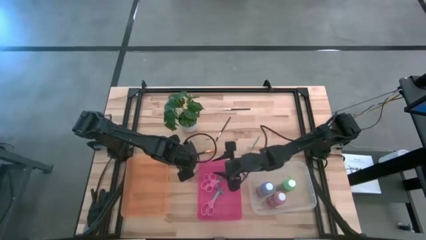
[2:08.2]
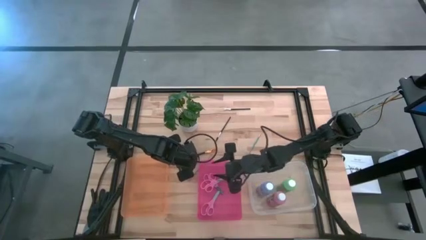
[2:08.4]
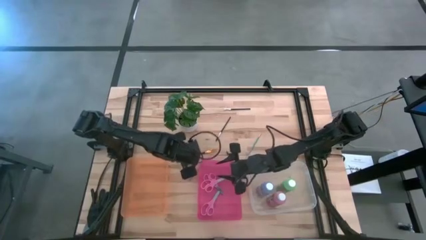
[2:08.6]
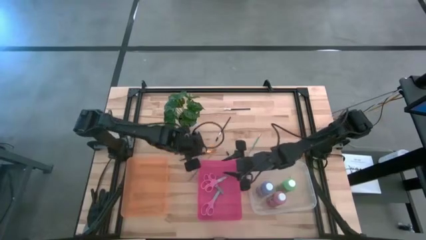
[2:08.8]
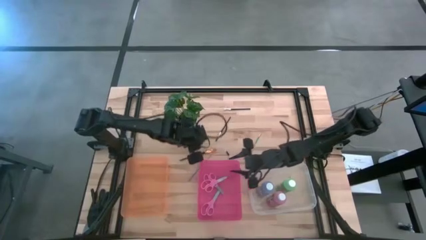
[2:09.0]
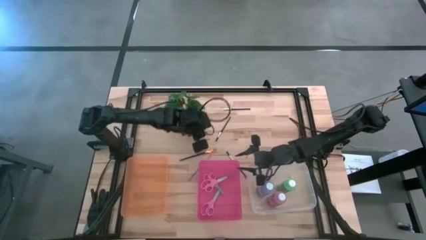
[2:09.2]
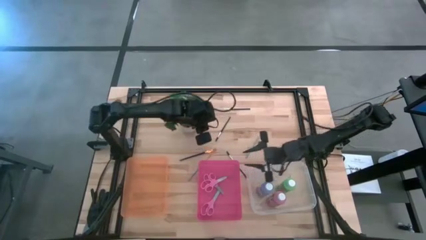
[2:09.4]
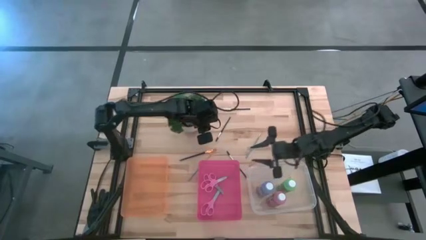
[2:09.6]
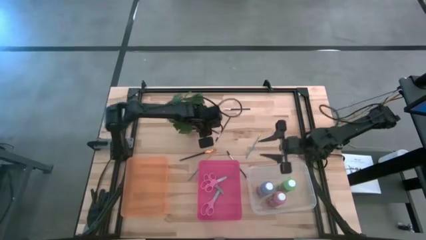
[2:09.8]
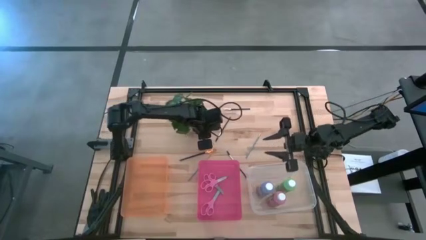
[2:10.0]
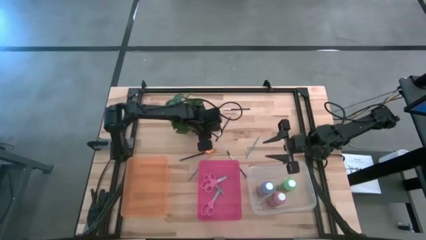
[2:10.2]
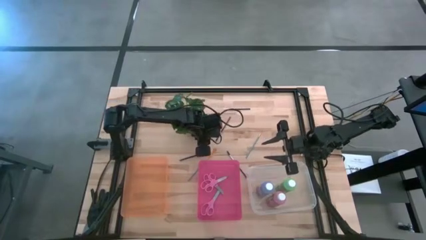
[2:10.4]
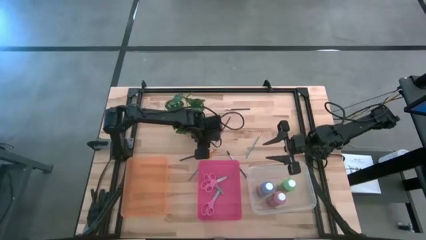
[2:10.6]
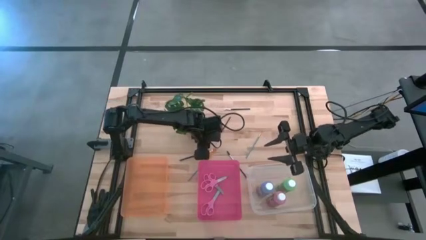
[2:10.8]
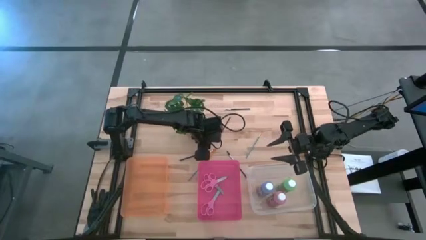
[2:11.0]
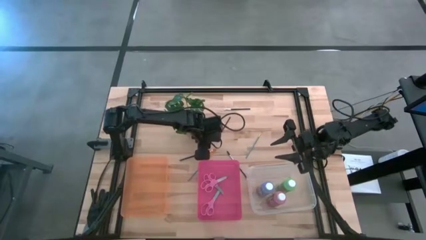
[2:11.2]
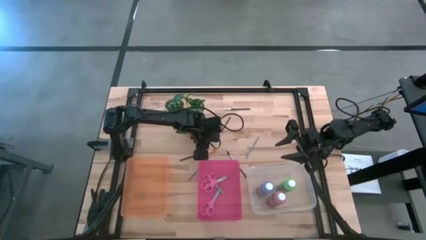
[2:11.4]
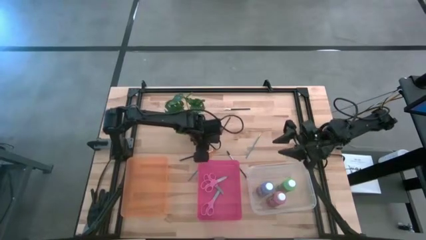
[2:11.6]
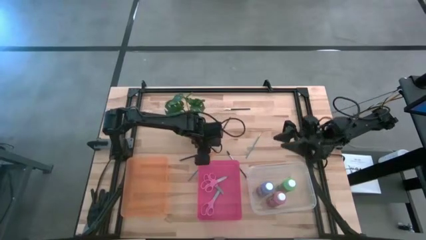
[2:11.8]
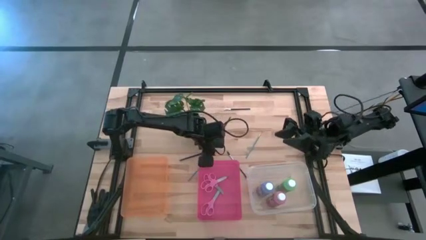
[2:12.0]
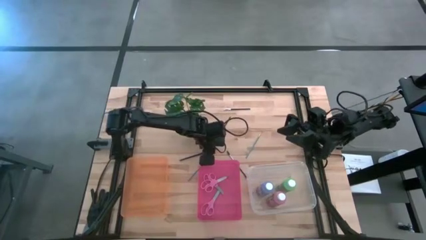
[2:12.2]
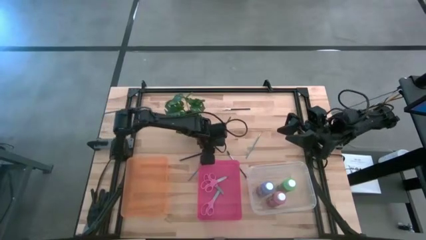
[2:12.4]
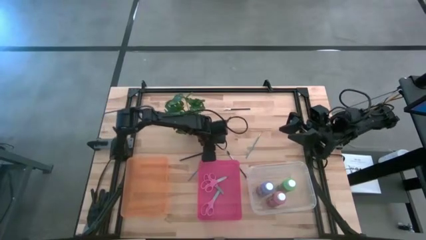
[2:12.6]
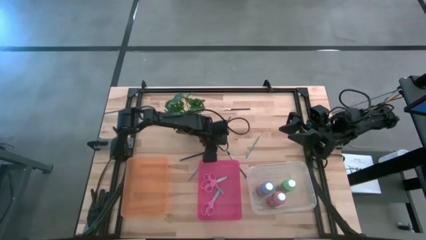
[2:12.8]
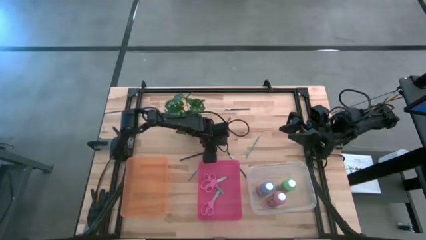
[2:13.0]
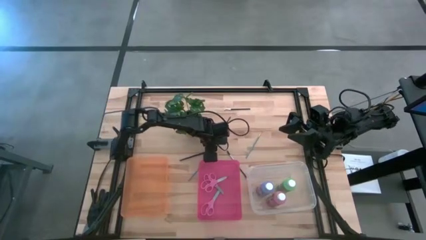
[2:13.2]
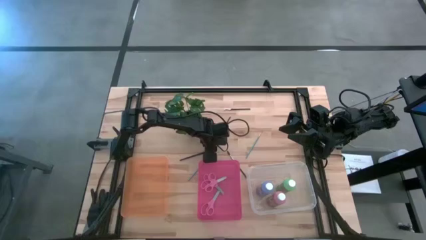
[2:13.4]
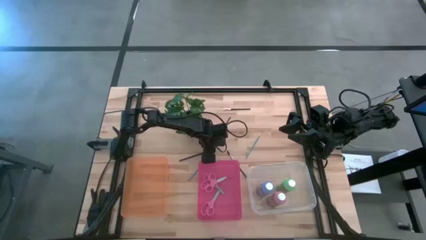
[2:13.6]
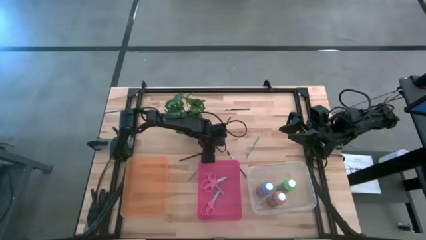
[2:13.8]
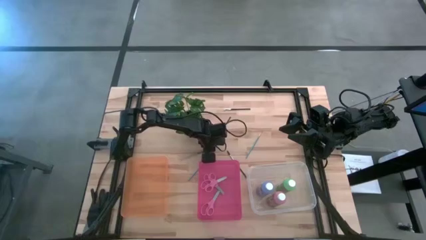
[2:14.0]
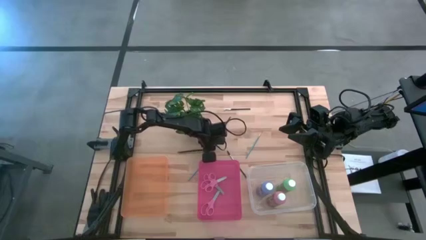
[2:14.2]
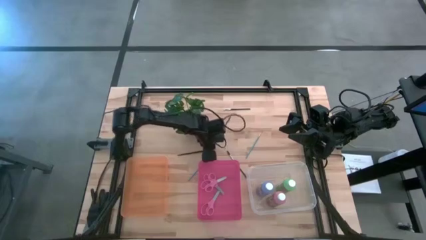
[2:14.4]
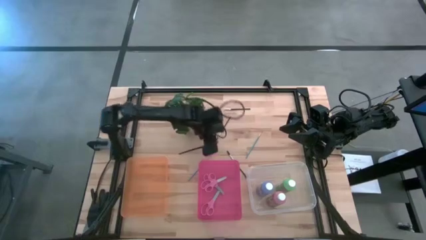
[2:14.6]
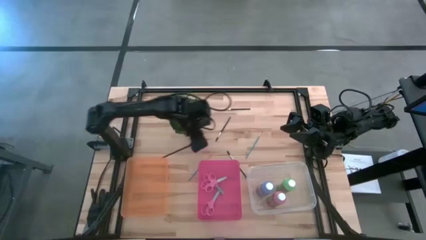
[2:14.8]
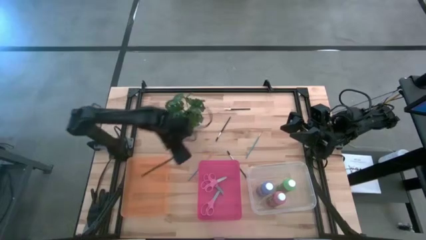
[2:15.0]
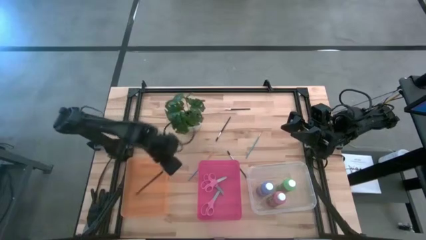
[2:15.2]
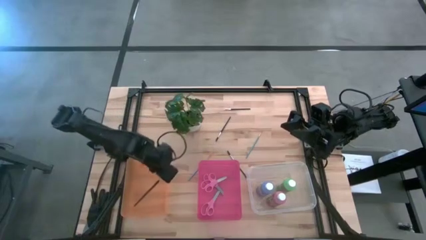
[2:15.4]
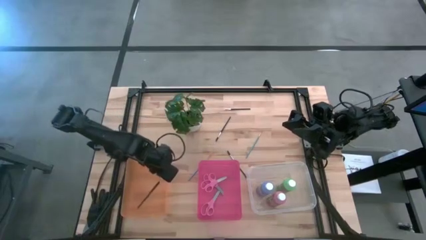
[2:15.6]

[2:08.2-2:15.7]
Task: Pick & Place Paint Supplies
Put the black paintbrush into the orange bin

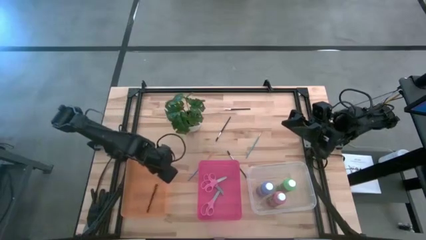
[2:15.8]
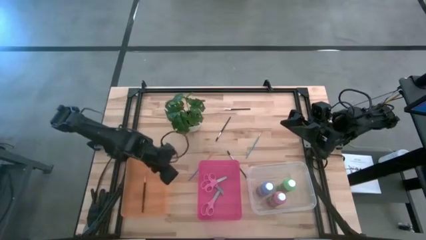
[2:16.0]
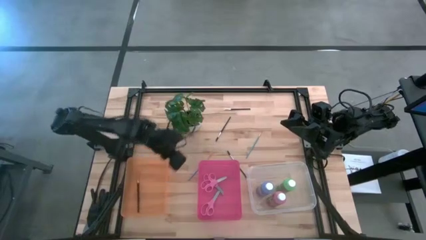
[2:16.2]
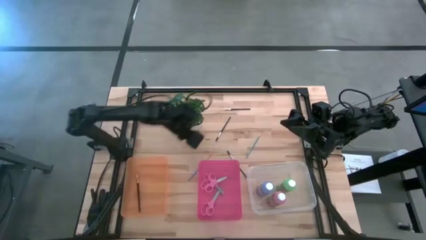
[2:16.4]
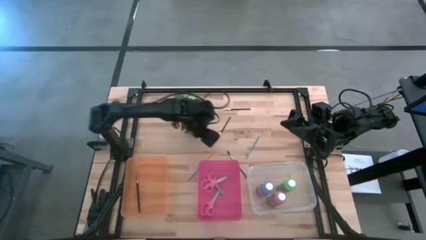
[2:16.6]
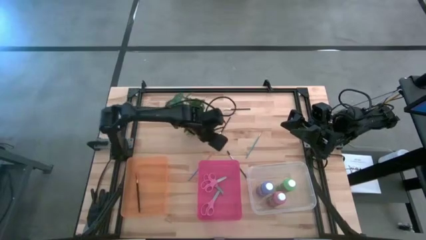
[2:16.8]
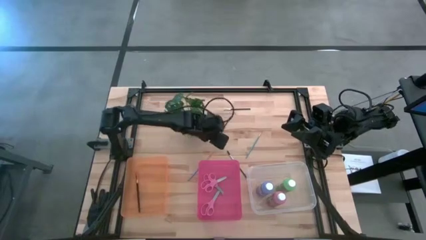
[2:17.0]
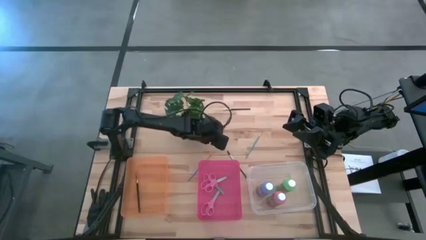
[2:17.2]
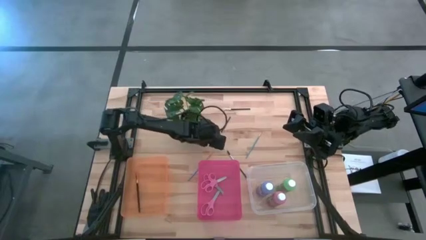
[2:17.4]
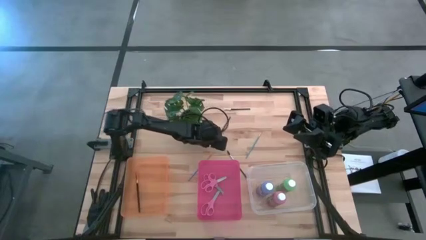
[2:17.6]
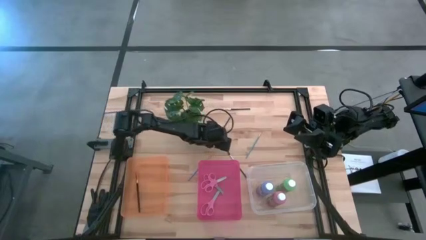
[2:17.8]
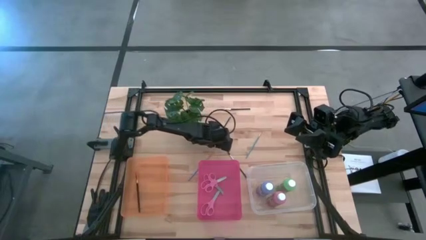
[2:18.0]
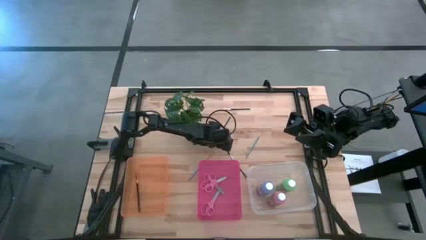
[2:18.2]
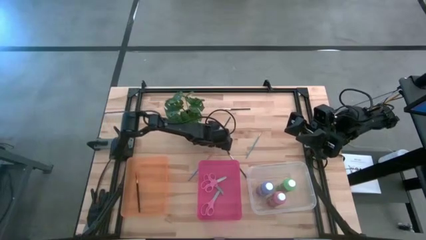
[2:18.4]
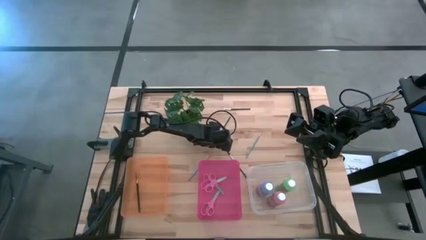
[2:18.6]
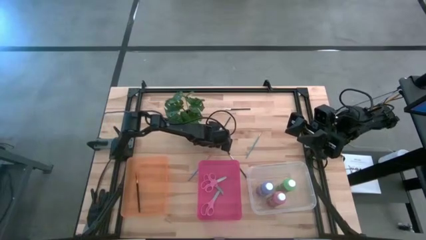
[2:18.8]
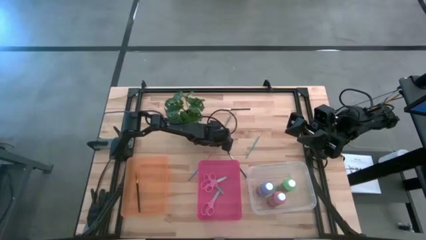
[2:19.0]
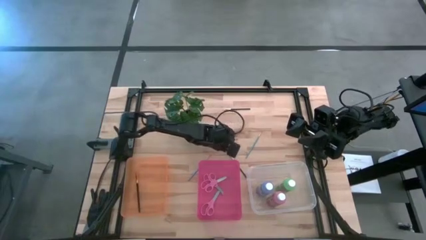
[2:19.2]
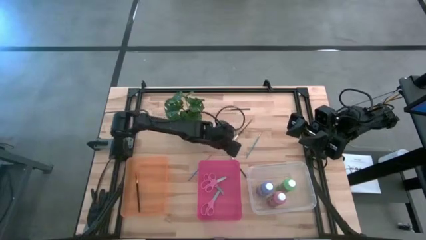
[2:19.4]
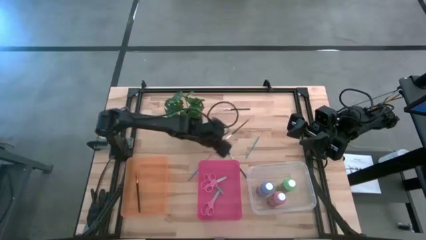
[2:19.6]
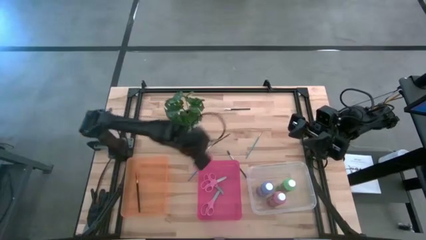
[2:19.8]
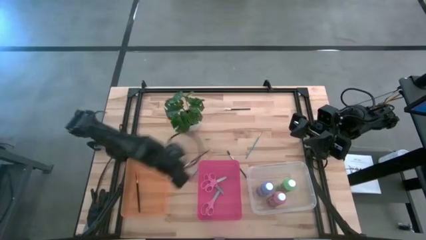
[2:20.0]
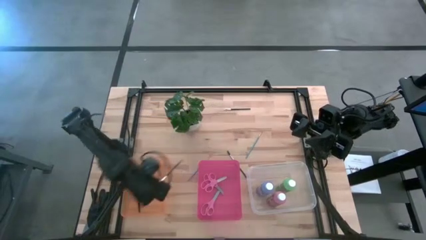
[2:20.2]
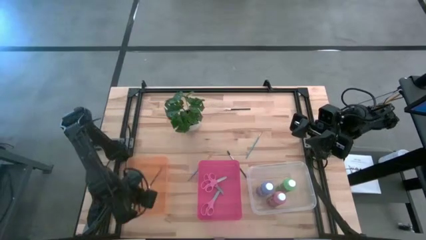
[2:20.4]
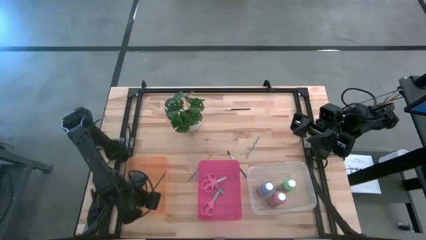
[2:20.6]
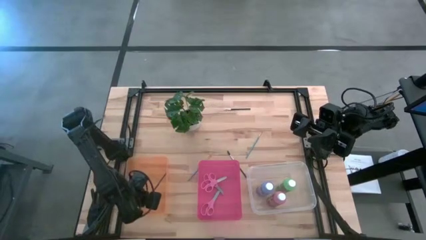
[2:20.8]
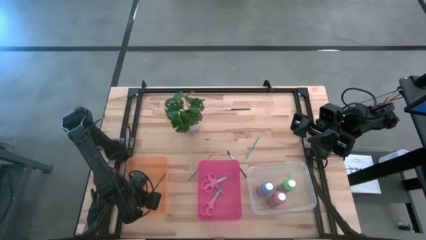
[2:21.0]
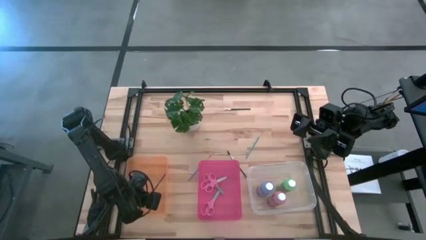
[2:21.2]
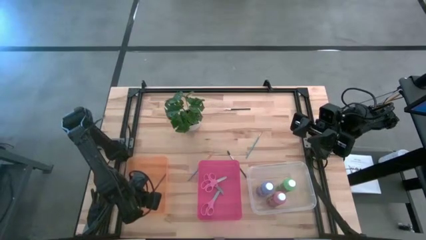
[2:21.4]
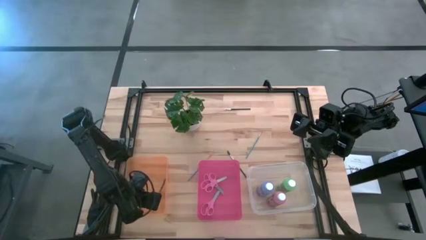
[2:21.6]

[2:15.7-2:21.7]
Put the black lash brush into the orange bin

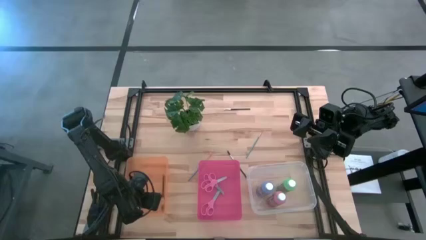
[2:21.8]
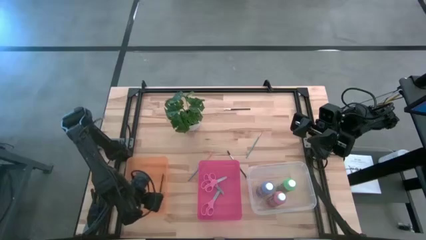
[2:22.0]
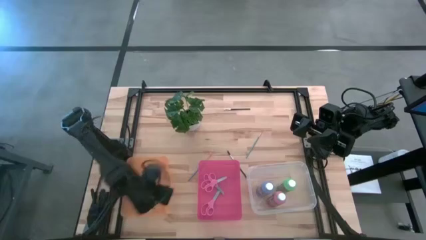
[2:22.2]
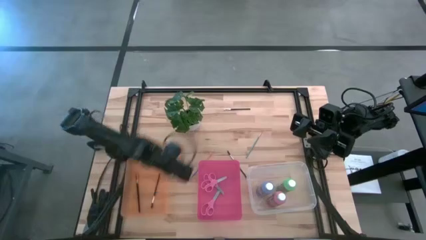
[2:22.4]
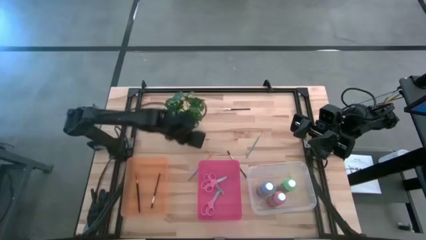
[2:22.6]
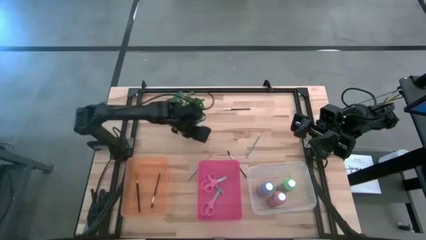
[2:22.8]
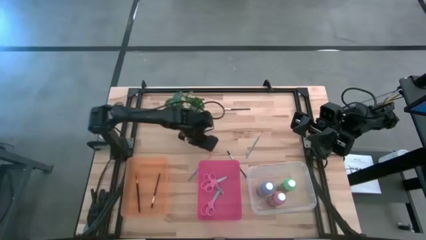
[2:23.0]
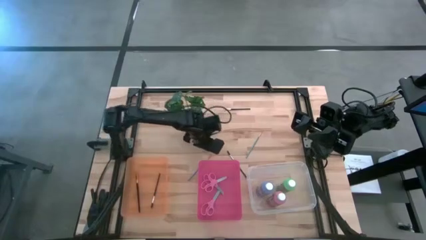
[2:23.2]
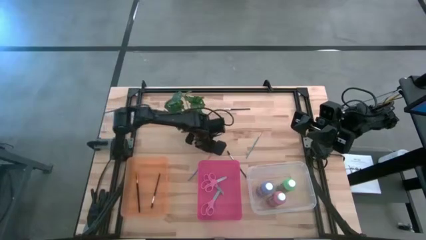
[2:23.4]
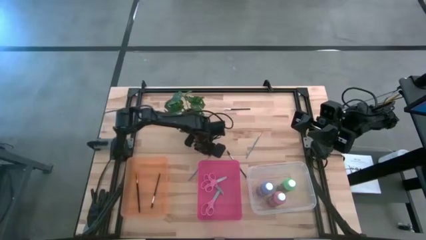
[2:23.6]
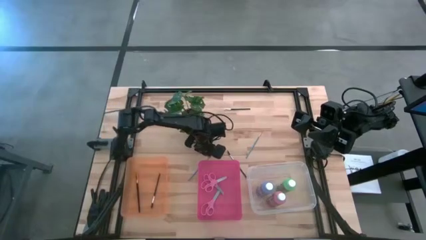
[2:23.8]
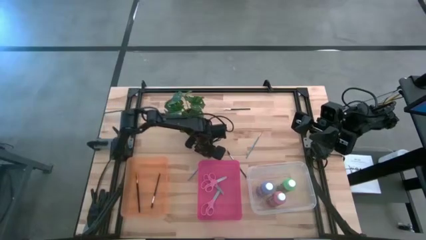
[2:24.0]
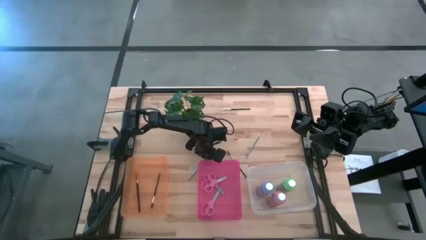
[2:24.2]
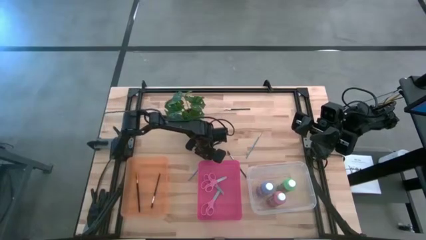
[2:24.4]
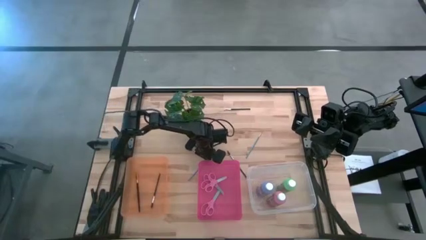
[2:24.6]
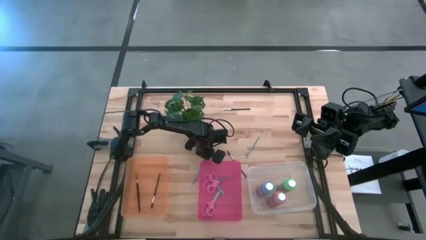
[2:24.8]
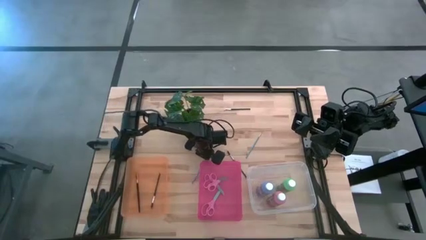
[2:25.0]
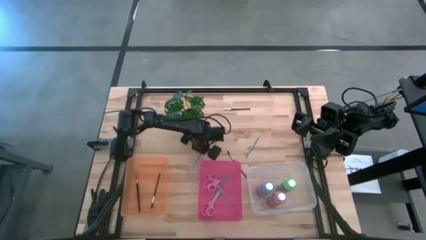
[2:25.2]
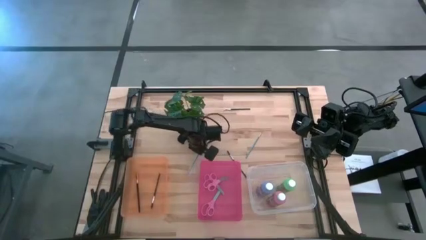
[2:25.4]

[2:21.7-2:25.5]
Put the blue paintbrush into the orange bin

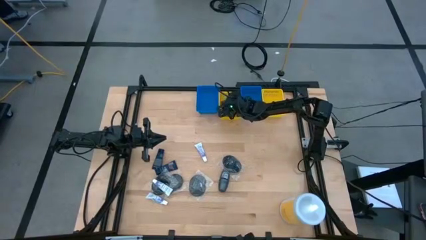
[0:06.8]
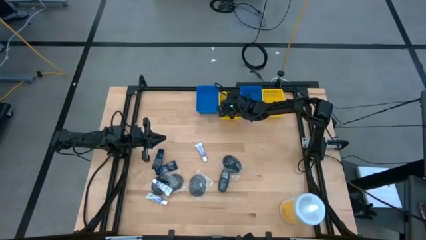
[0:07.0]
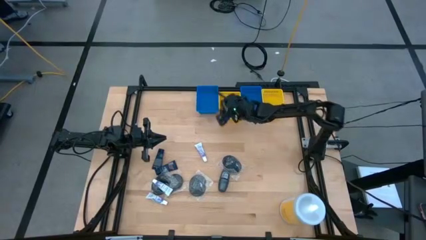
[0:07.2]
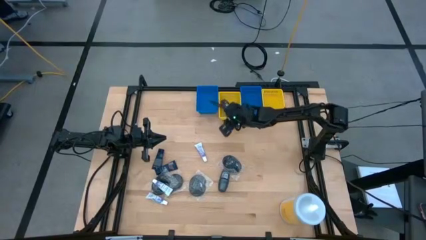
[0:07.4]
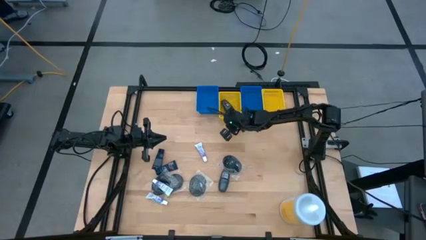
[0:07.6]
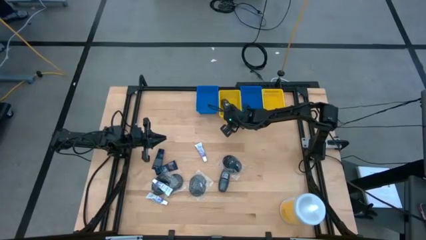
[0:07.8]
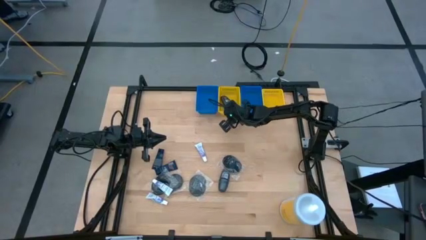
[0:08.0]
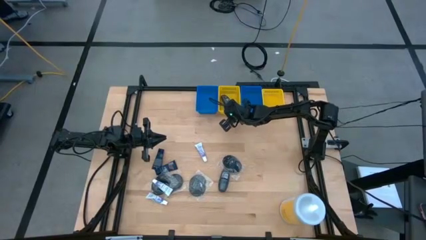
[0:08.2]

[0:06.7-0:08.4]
Task: Pick & Place Travel size toiletries
Adjust the left yellow bin
